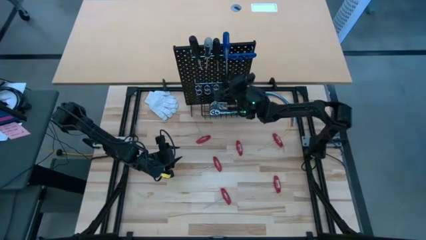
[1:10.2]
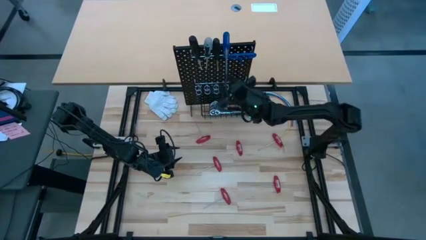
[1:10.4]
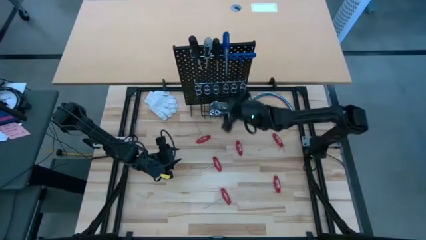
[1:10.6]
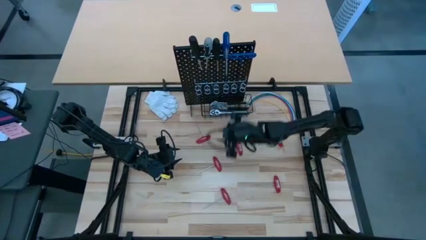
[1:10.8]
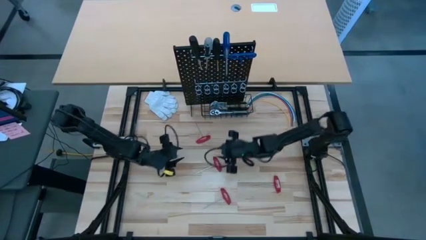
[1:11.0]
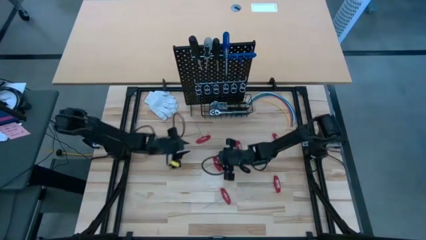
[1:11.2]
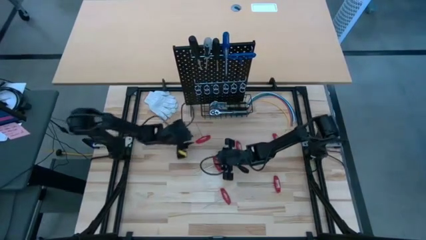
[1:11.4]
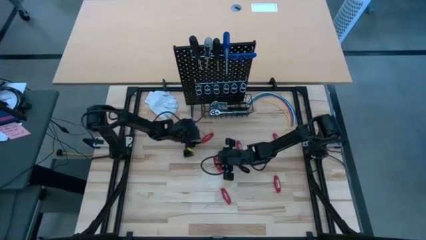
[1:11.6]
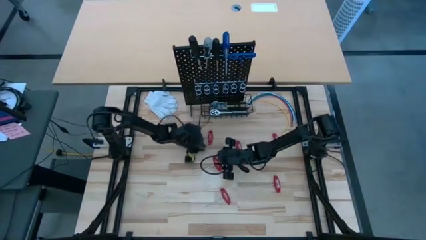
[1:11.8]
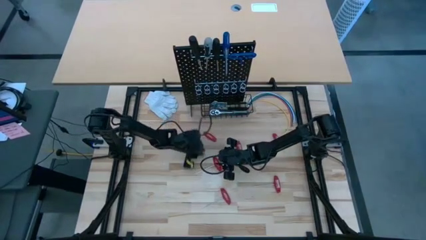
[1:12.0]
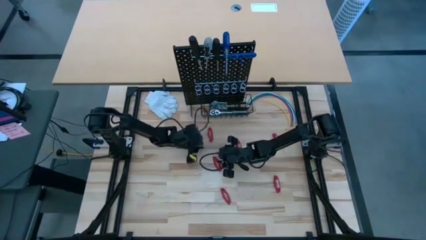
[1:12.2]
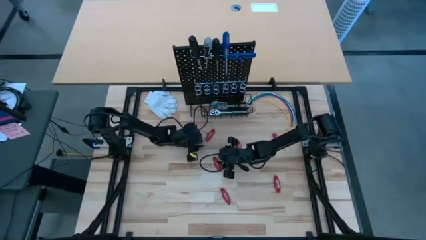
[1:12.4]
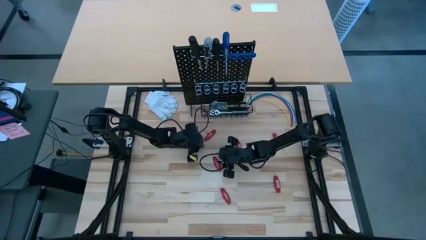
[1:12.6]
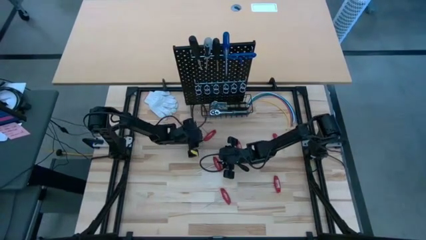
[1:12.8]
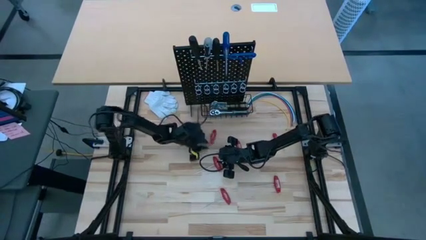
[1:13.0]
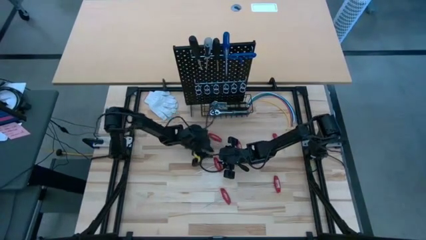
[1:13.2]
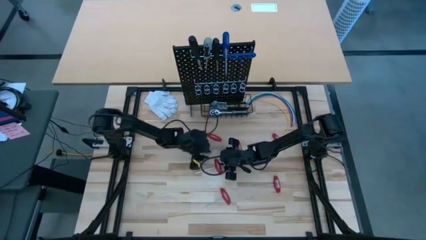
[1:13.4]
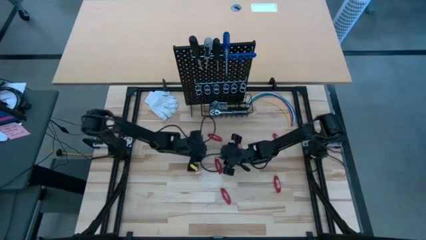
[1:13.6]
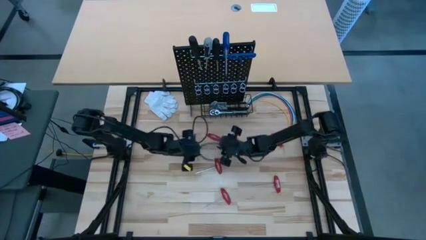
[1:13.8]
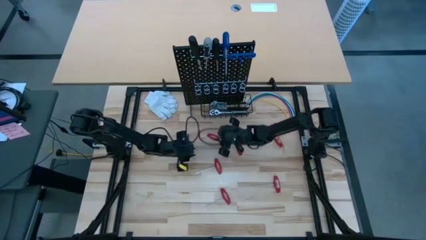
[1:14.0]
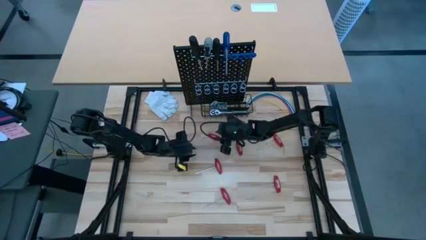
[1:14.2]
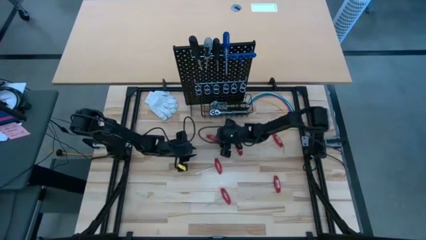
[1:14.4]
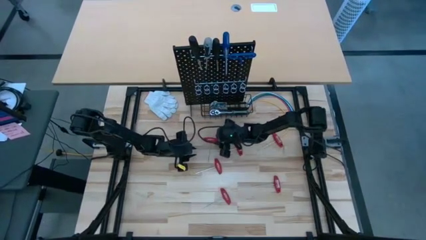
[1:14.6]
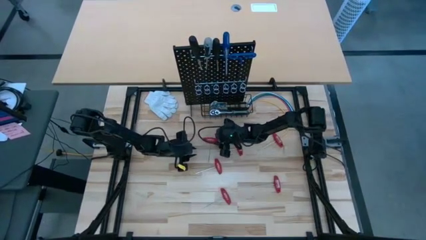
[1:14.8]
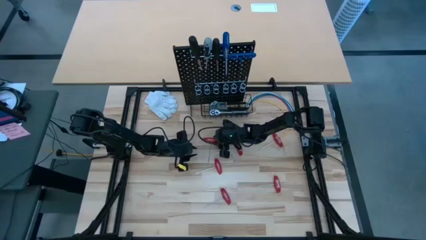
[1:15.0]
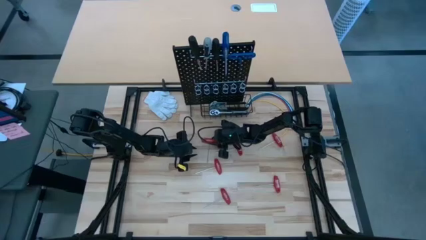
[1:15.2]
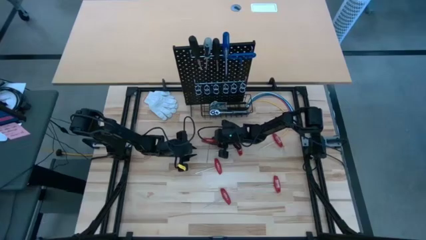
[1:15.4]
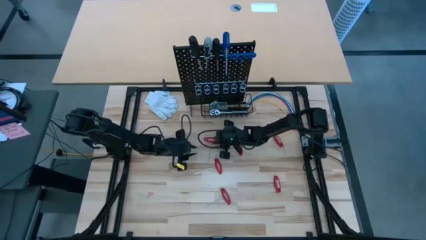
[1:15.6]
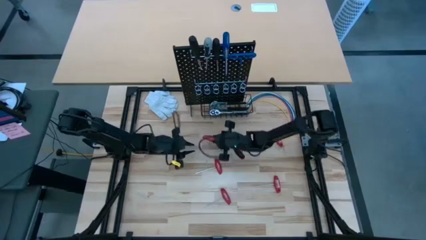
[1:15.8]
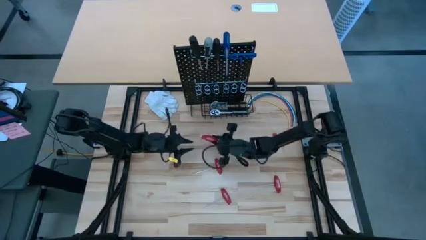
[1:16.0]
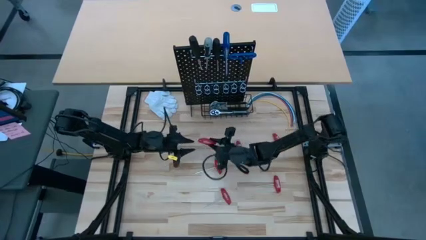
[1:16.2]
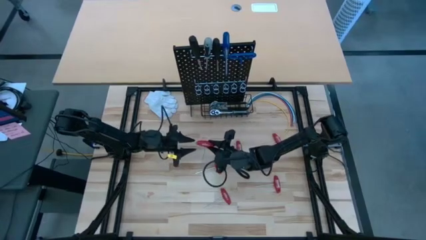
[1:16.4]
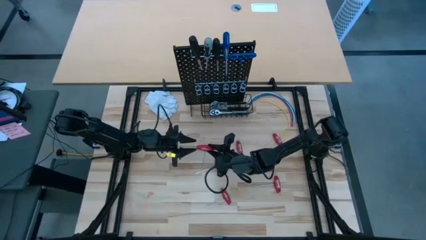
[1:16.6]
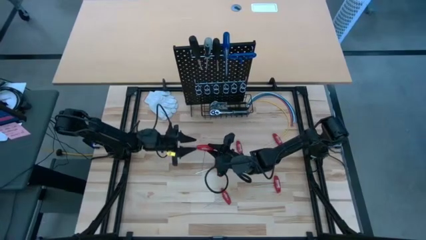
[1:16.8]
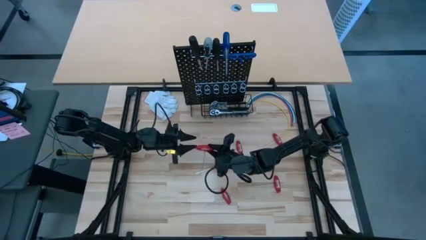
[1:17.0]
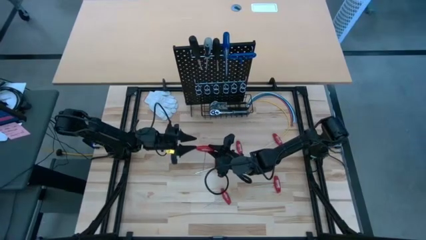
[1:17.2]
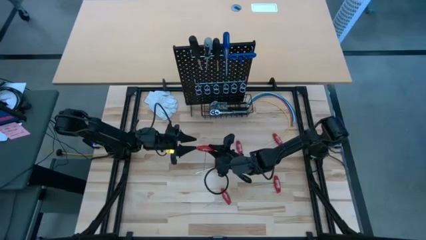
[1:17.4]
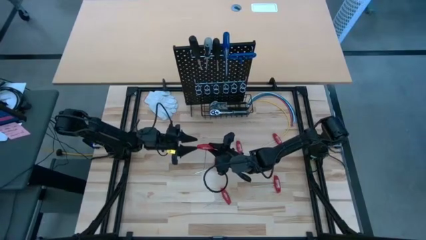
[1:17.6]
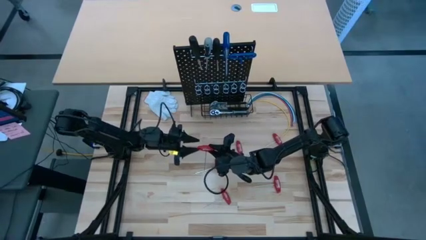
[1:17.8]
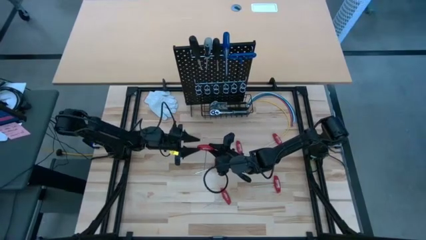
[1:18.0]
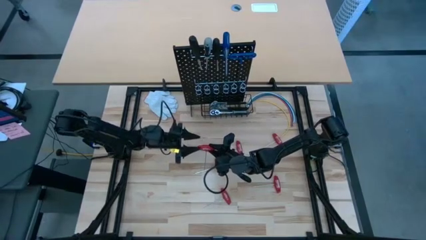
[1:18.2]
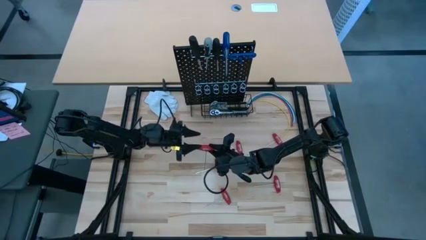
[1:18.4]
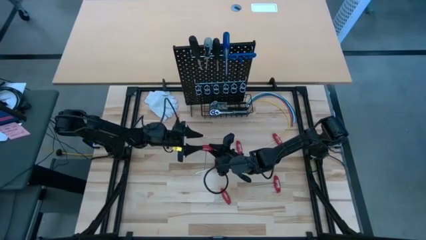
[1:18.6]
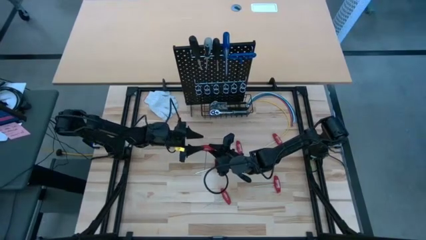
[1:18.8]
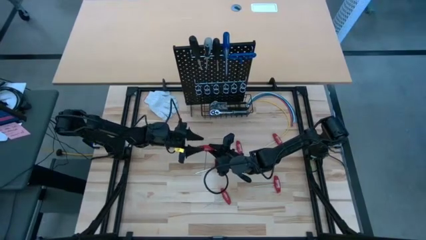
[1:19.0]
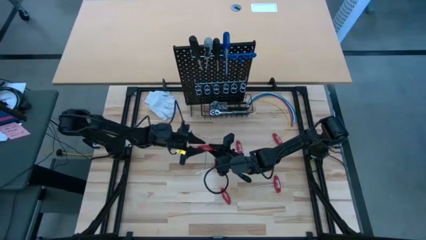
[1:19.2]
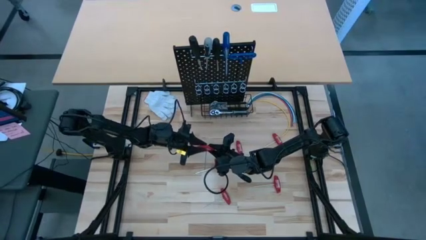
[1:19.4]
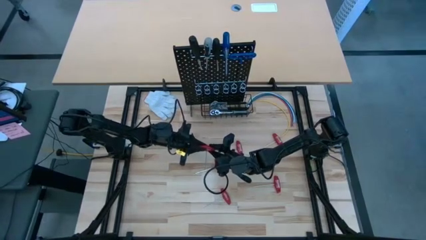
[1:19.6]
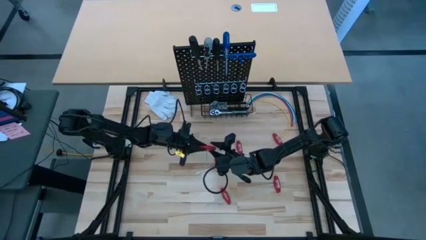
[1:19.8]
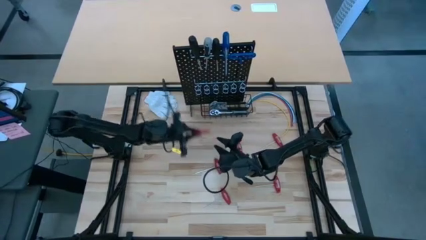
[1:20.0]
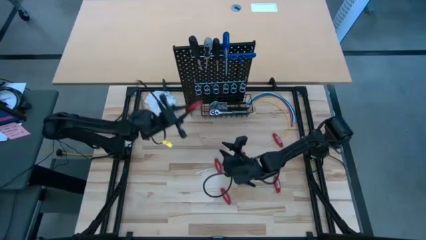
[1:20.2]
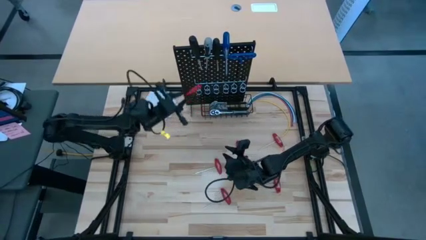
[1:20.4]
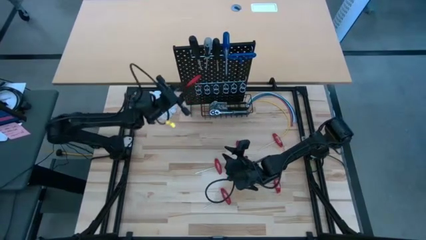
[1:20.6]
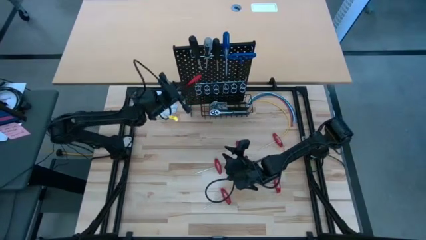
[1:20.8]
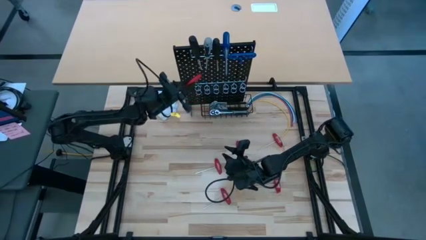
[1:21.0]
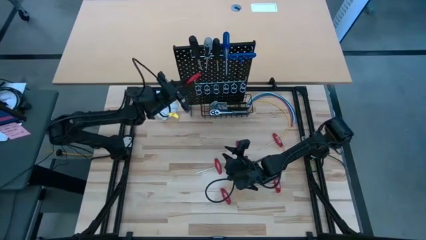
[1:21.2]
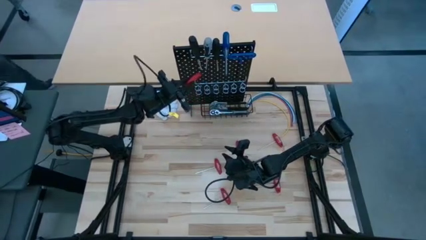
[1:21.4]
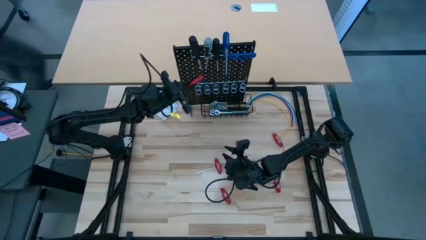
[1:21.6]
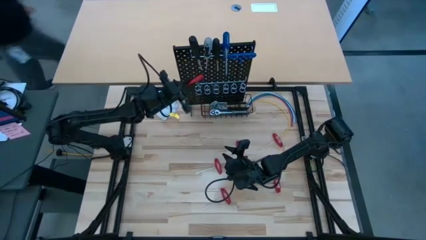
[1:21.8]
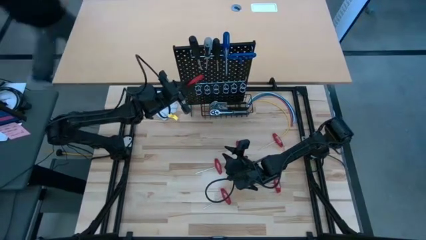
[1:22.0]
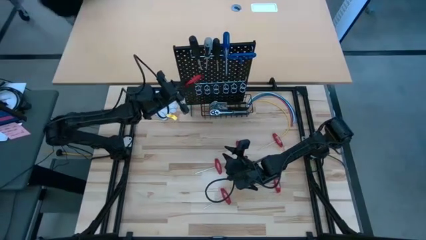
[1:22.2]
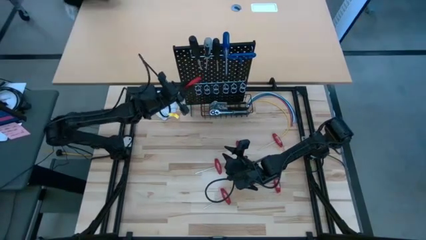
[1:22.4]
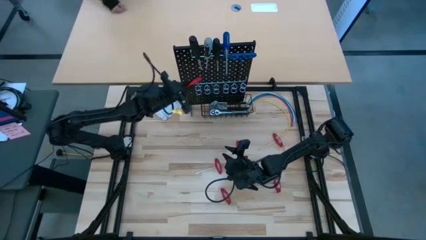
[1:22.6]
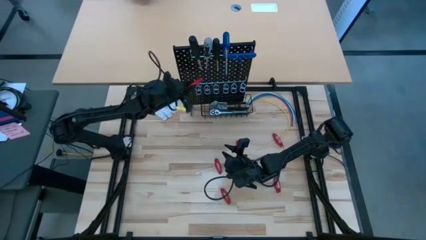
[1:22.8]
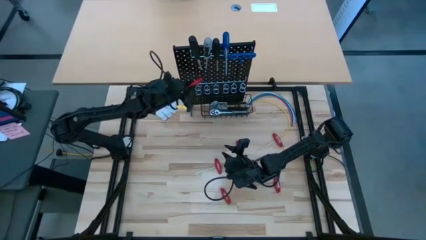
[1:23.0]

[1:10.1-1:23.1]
Task: Hang tools onto peg board
Hang the red allen wrench on the pegboard
